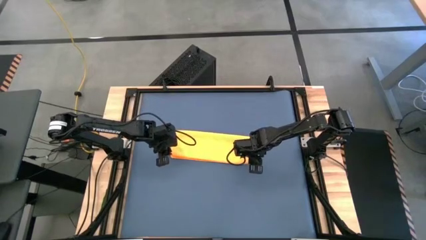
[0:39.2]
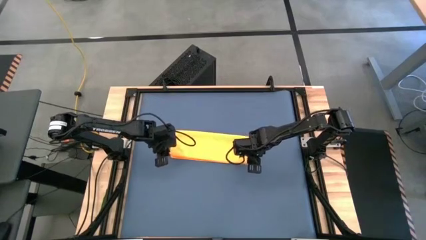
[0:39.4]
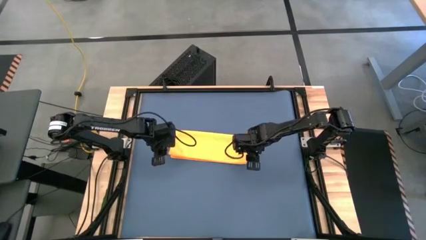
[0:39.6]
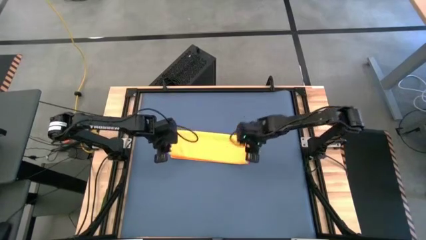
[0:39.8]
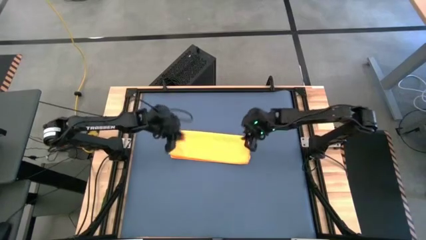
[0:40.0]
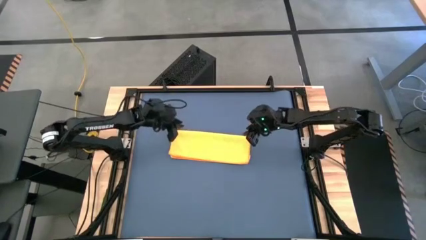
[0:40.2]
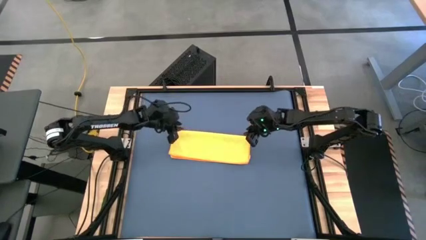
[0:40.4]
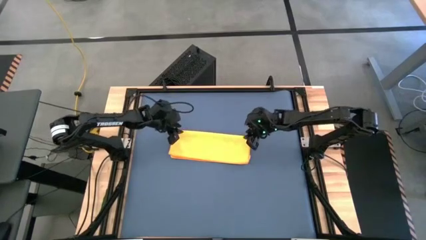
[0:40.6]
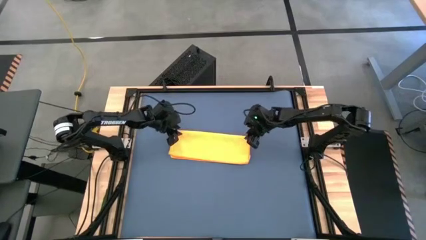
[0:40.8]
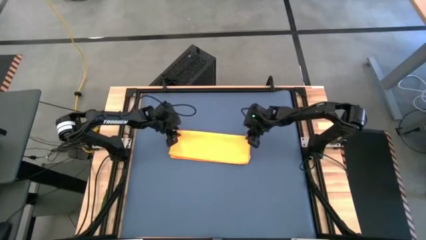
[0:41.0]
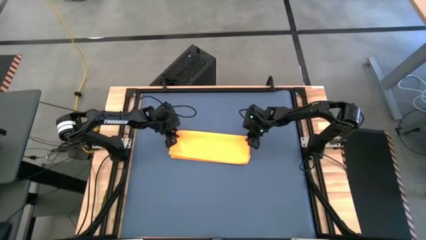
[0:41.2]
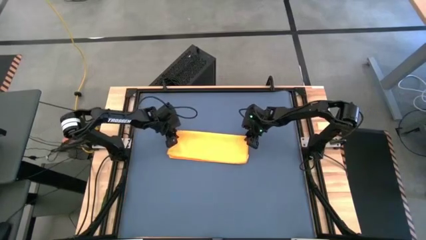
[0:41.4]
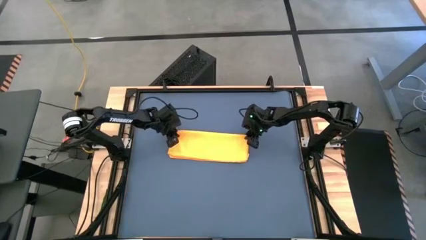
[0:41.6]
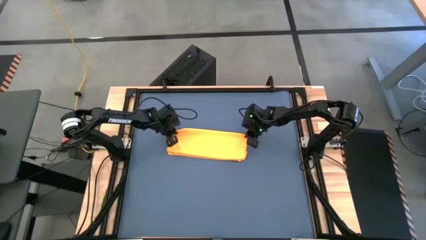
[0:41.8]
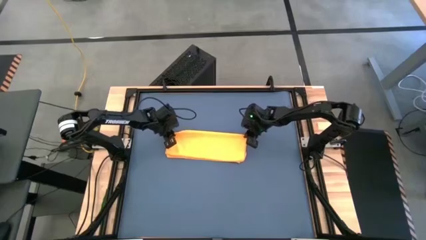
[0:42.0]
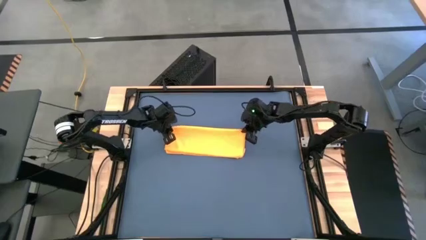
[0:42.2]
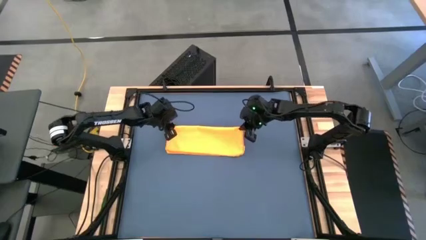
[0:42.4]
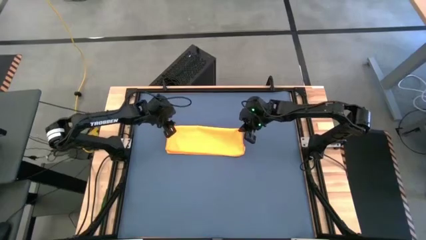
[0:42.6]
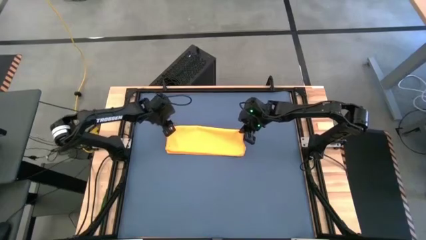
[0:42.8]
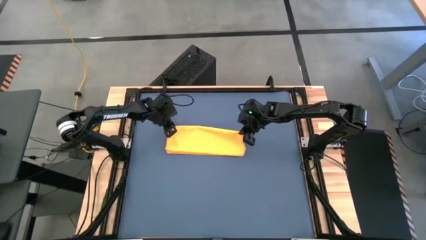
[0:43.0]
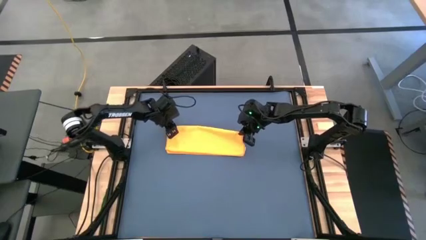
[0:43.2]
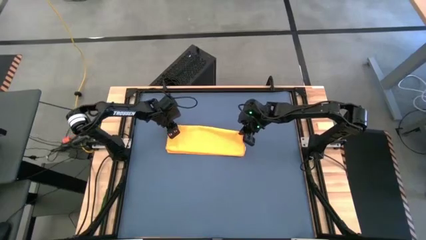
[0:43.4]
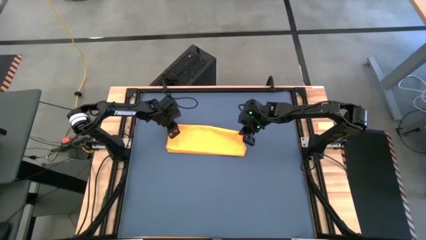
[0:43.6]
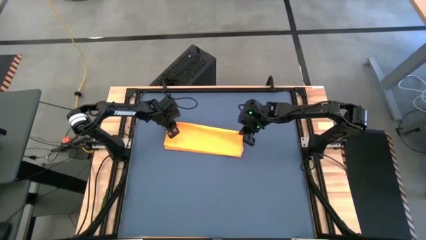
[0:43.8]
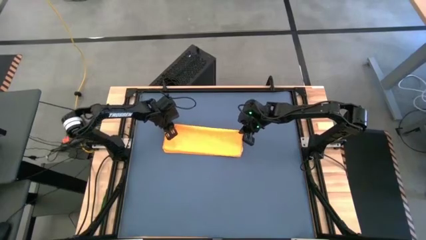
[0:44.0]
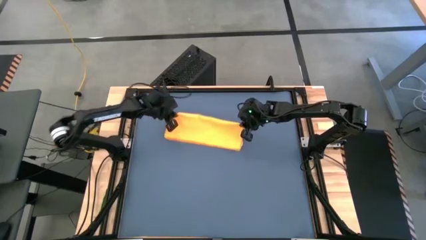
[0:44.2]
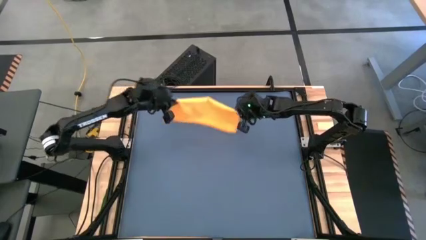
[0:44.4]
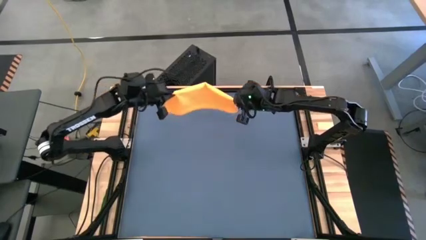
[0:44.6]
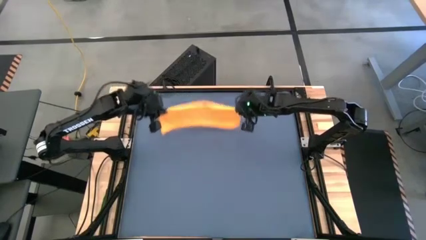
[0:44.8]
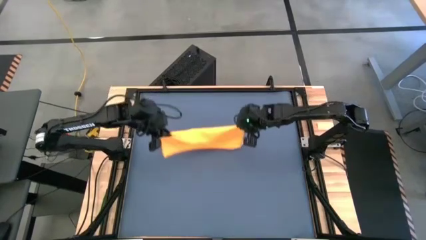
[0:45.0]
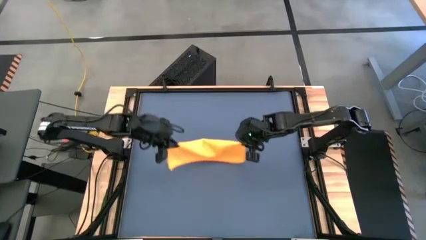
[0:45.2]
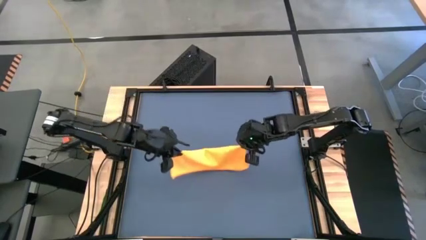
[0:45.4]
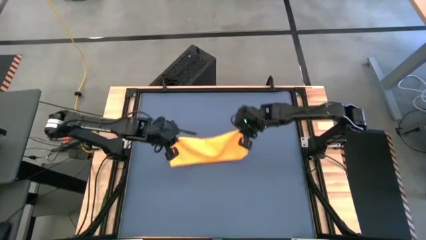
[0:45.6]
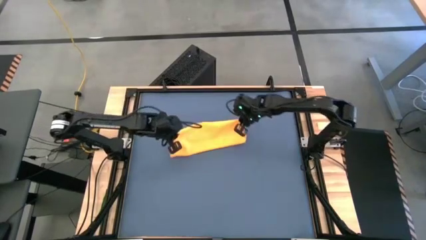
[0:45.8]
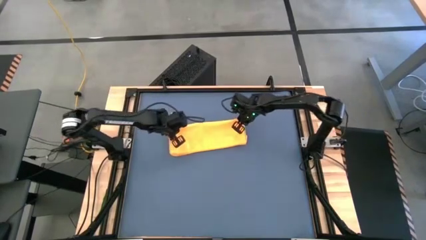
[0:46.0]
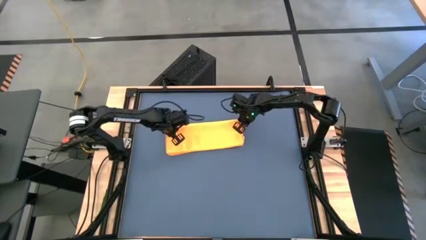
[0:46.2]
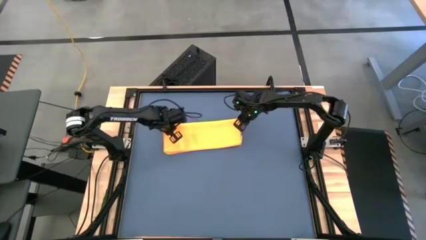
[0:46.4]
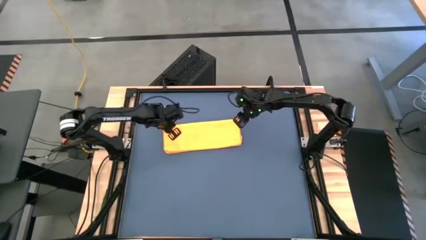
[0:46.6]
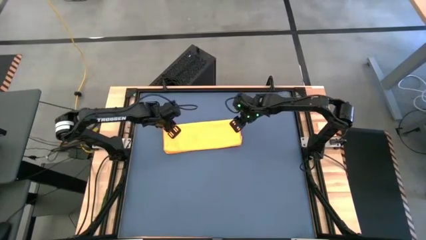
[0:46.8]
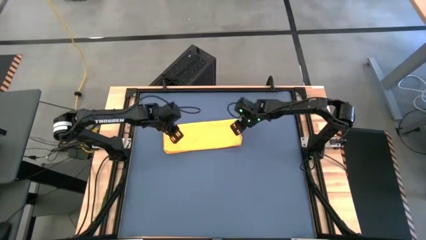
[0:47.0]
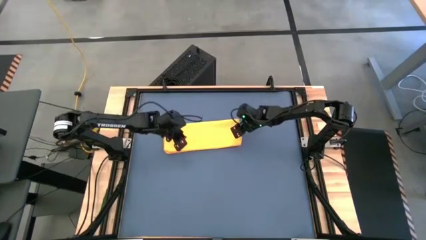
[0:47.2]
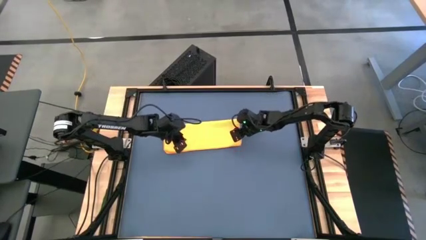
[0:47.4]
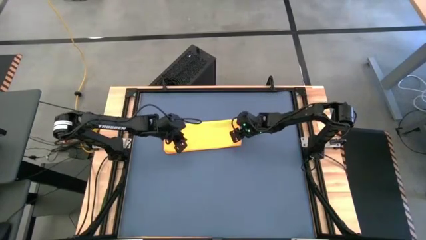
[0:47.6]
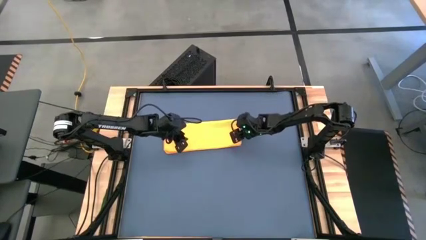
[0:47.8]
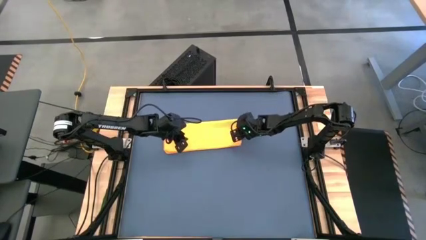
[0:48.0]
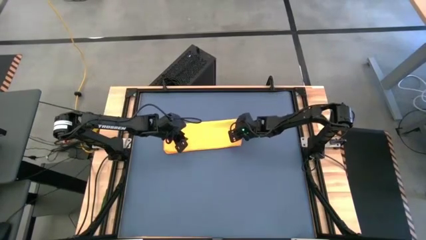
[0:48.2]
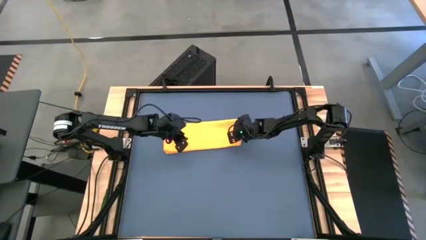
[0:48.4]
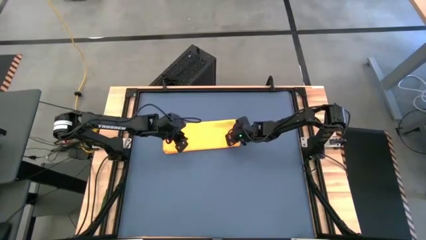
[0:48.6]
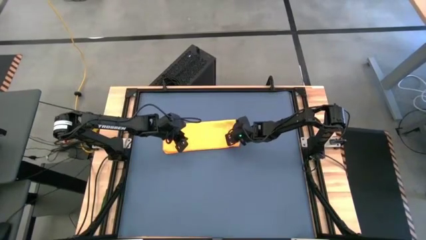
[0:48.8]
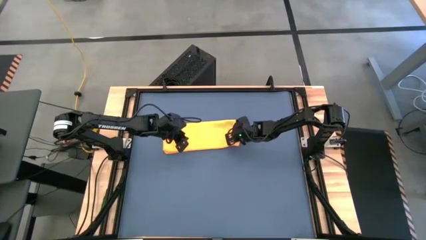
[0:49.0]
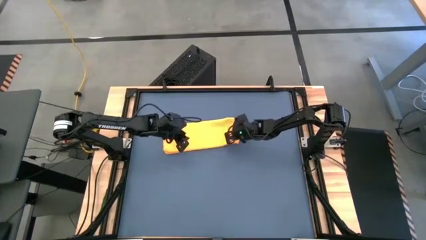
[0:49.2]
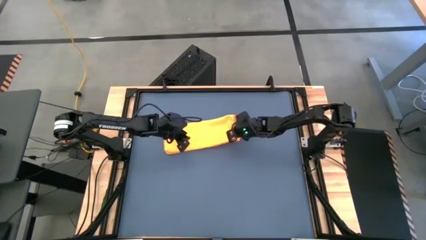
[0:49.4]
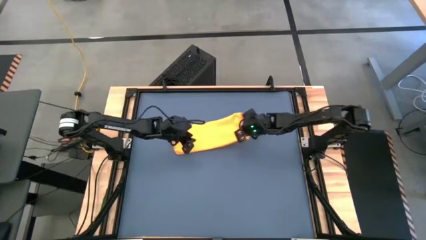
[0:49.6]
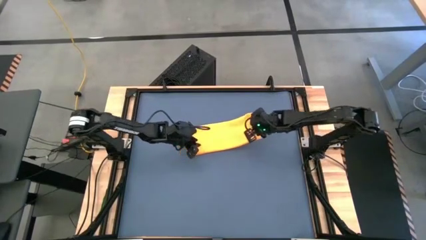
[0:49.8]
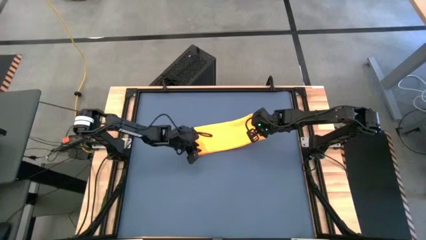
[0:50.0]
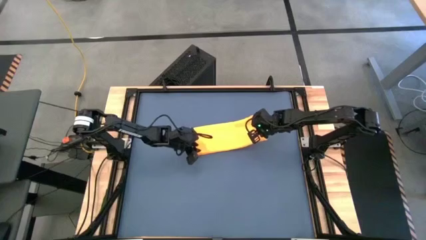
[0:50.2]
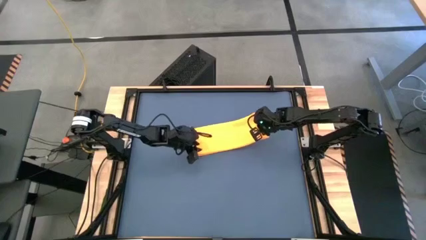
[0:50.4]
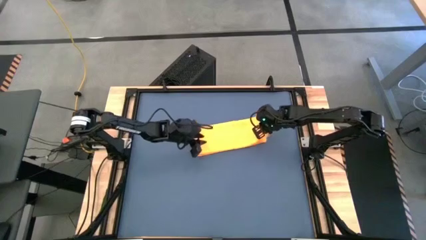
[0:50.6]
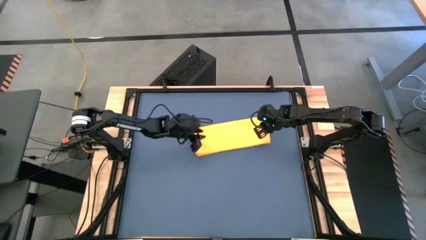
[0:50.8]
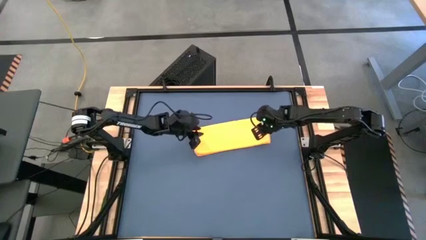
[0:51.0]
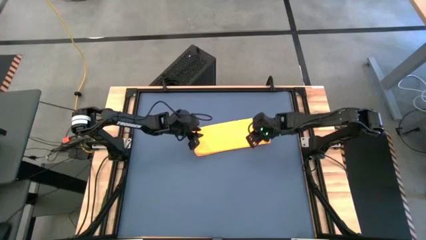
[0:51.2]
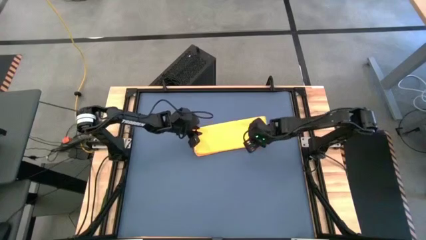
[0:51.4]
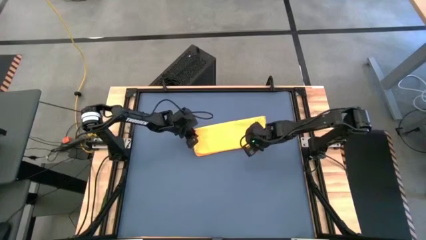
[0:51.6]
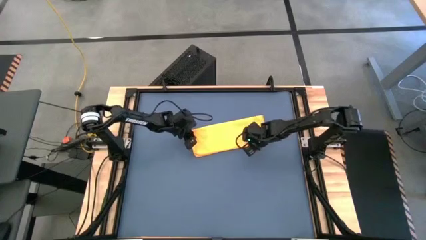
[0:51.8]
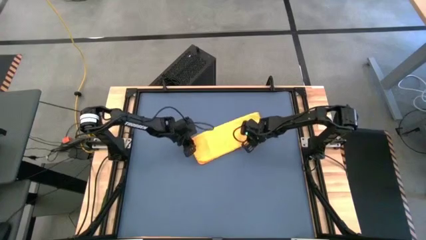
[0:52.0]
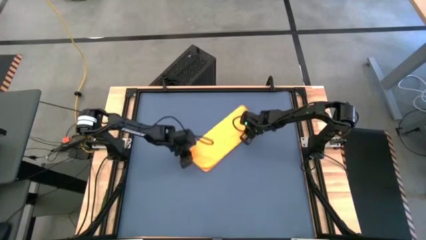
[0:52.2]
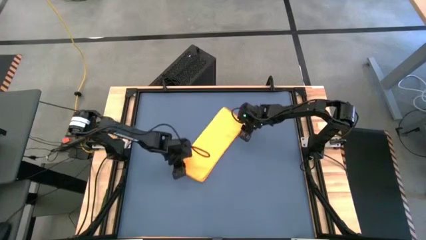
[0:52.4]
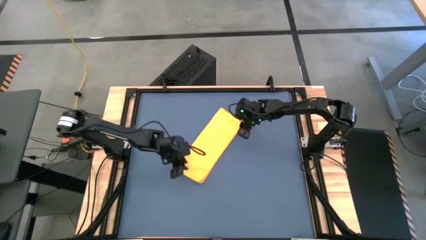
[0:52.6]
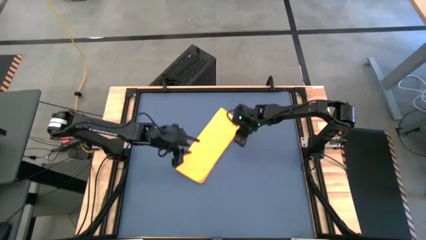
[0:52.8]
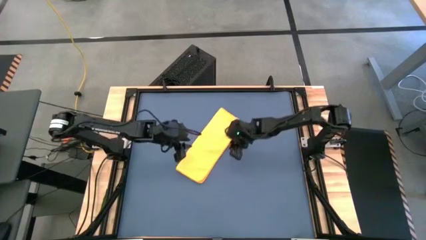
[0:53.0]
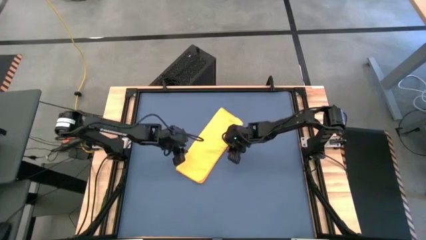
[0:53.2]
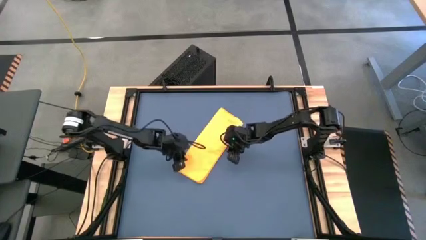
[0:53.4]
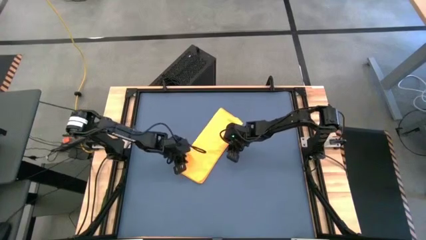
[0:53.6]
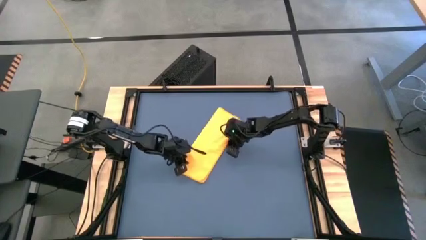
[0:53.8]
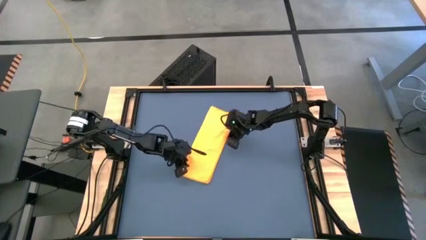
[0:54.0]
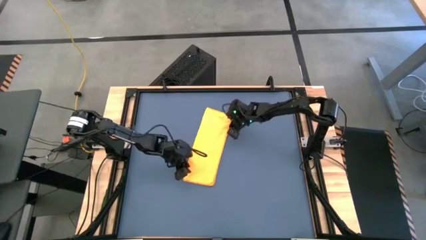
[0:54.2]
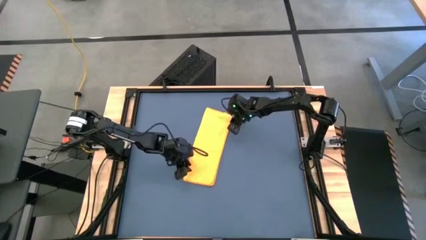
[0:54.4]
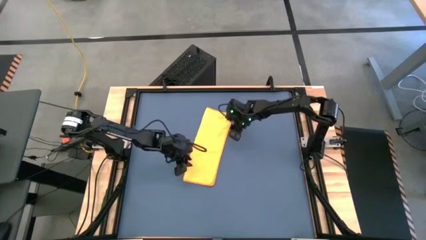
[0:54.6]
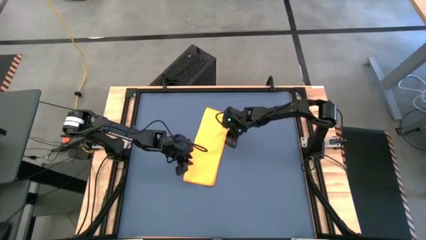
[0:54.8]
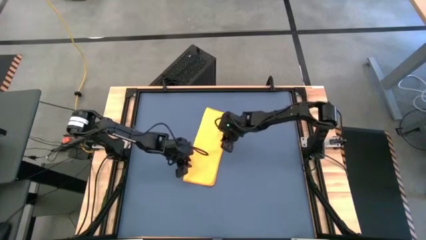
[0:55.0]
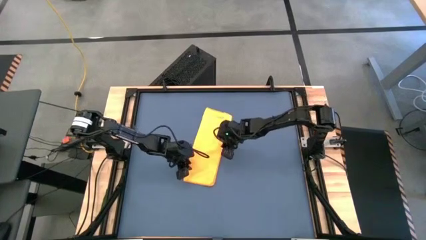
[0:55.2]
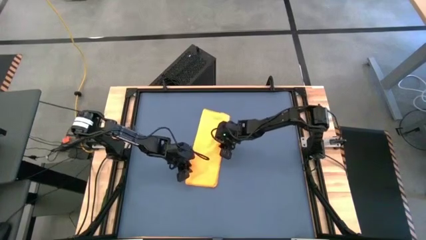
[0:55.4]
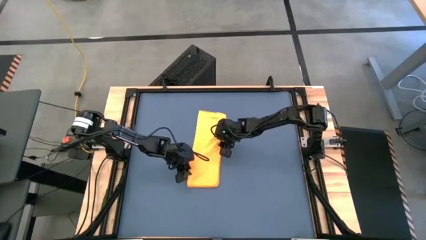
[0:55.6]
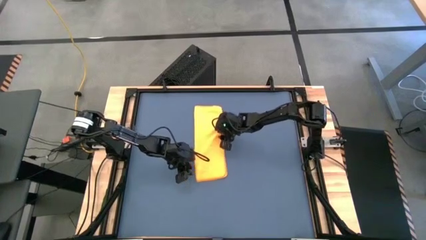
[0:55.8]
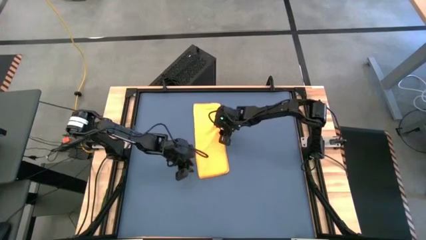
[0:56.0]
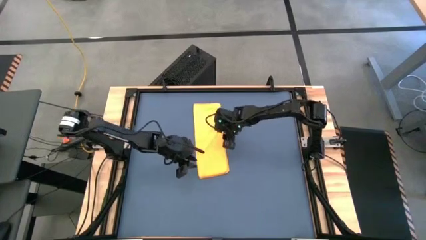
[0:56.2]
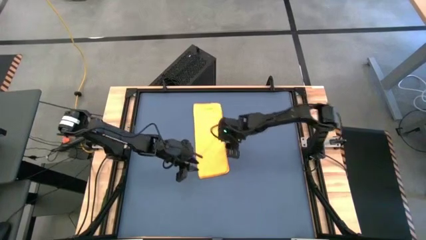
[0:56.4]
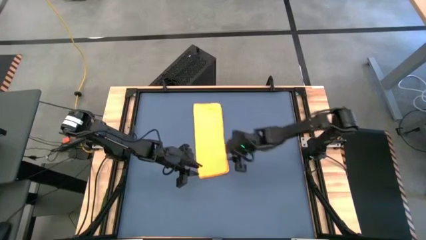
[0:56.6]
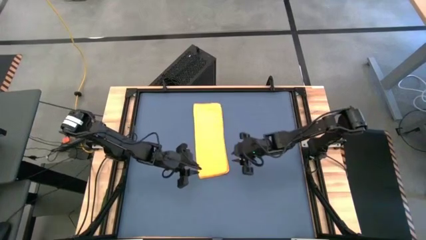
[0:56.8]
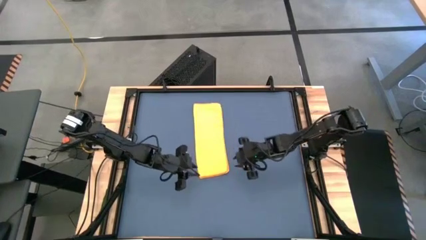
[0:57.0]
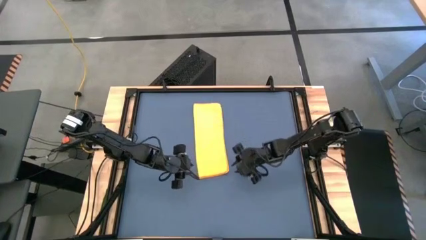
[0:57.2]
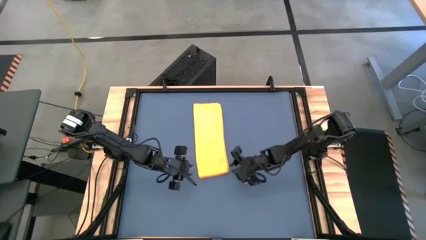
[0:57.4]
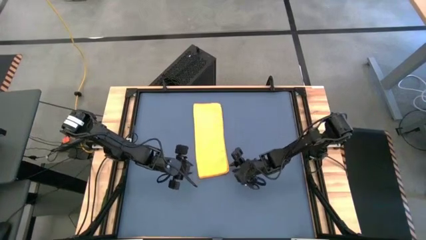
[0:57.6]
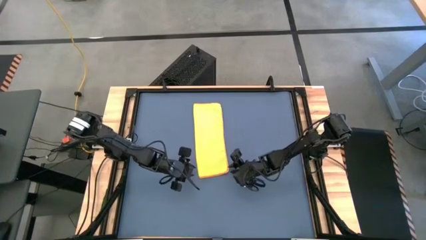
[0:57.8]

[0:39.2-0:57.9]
Task: Roll towel
Roll the yellow microfiber towel
